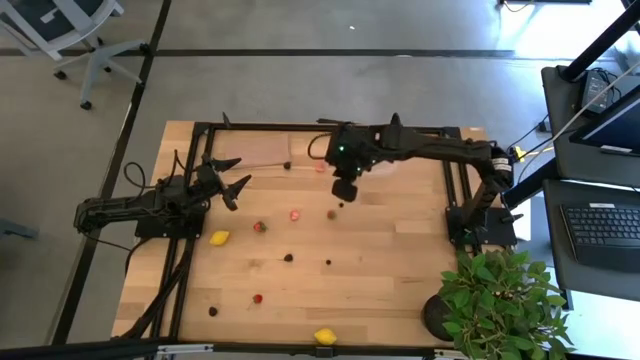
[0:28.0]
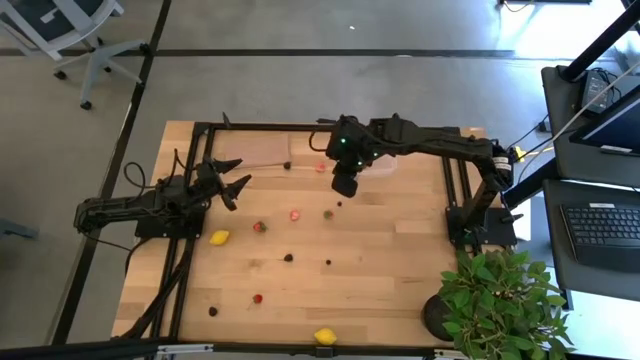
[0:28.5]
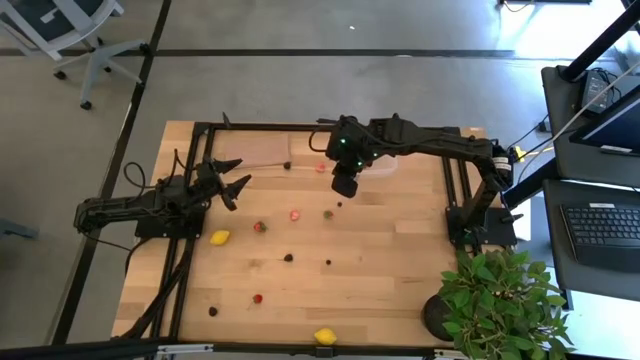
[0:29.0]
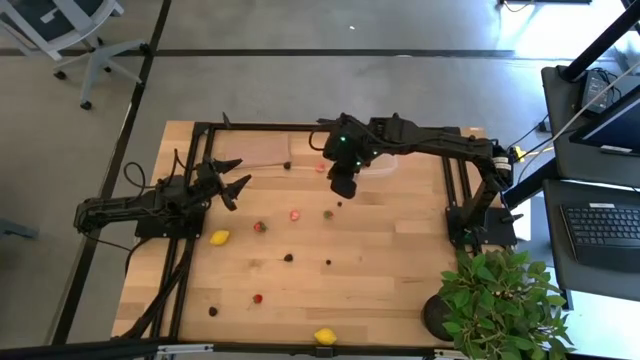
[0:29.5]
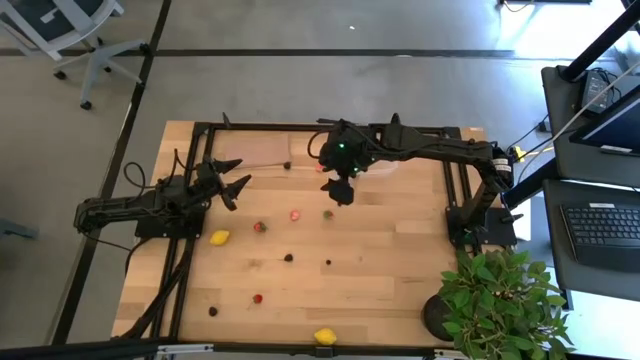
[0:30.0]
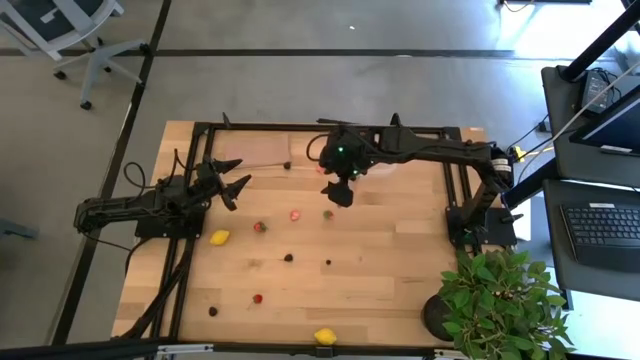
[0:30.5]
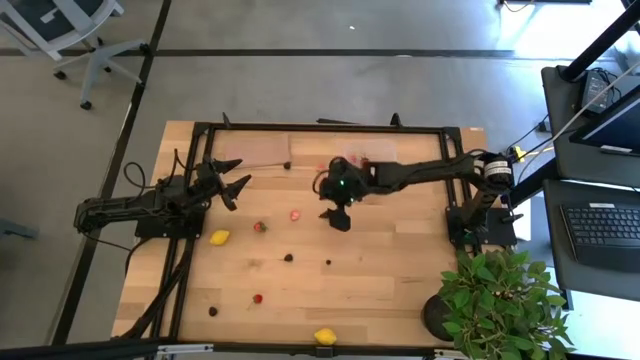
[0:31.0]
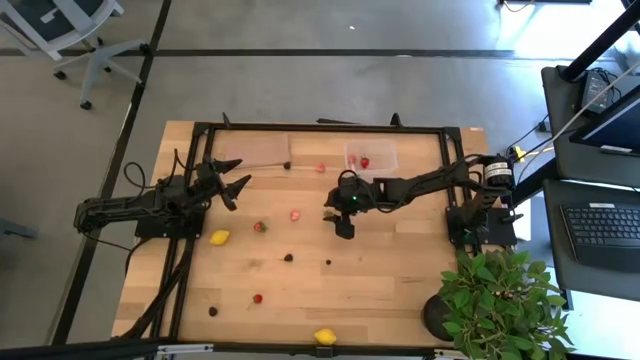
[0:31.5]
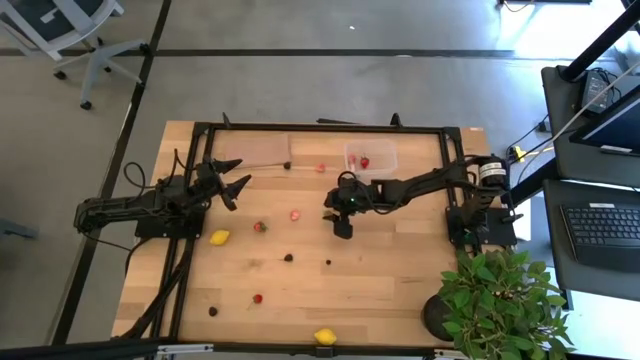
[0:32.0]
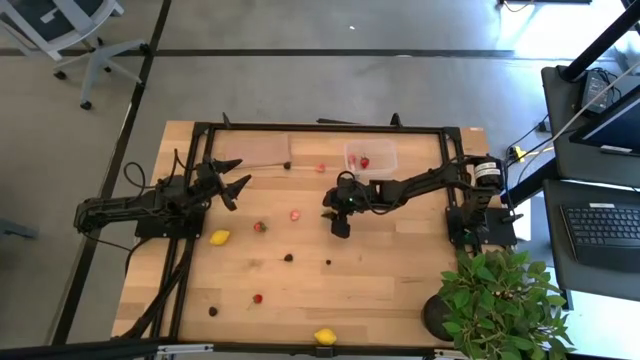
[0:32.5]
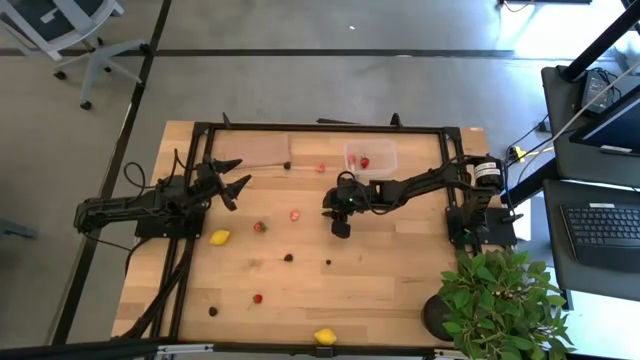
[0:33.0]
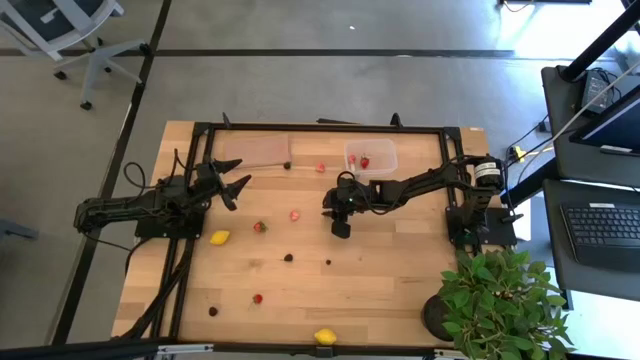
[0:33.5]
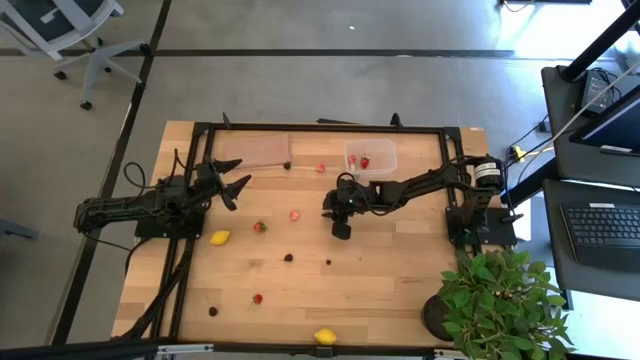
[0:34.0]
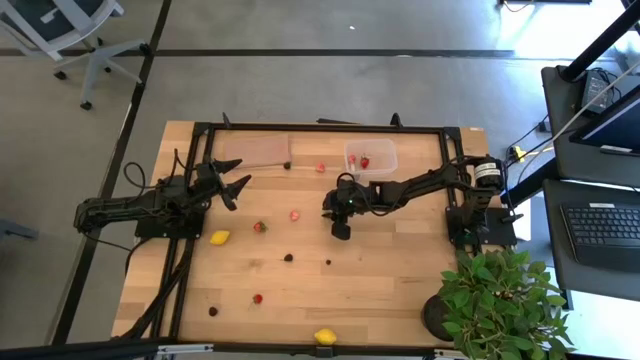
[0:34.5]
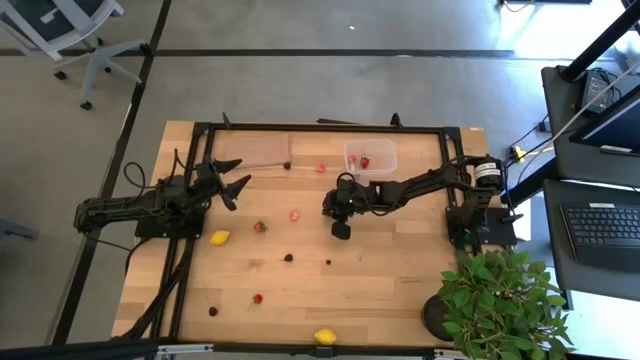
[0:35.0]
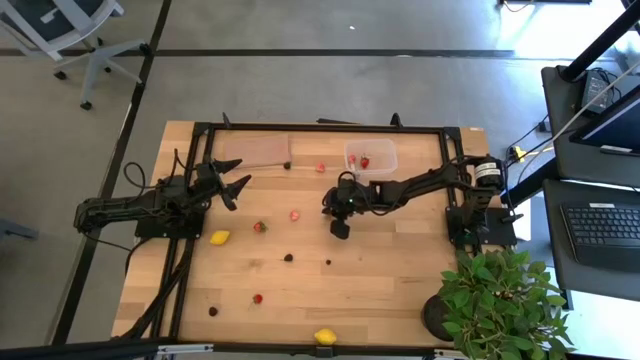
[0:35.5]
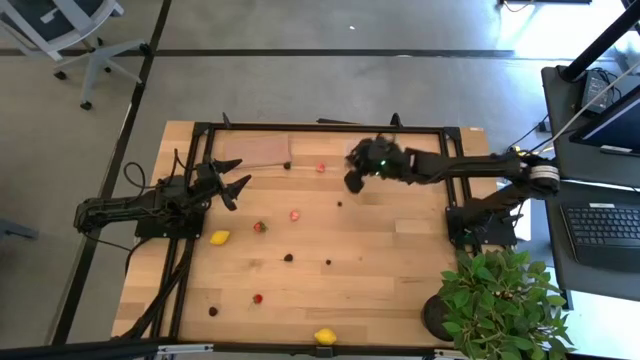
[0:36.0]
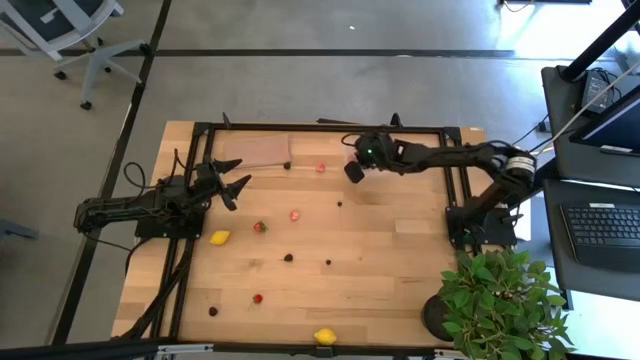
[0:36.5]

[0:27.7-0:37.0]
Task: Pick and placing Produce into tupperware
Put the strawberry into the transparent bin

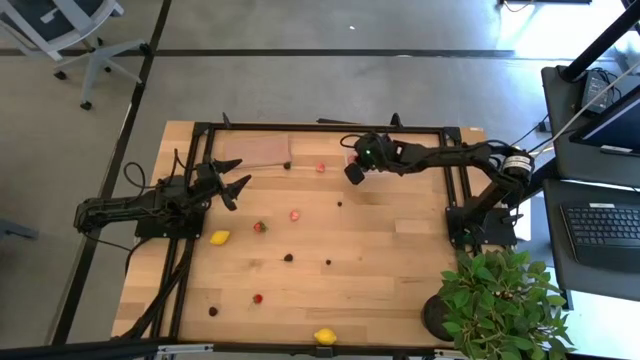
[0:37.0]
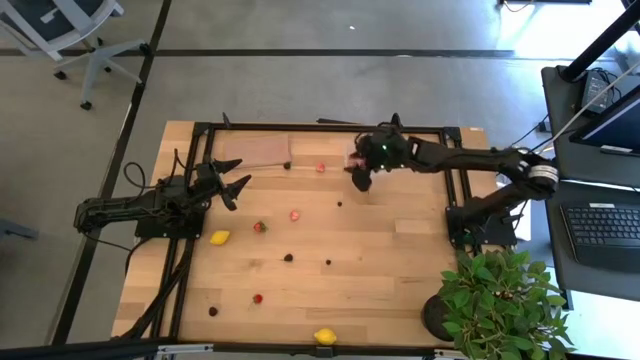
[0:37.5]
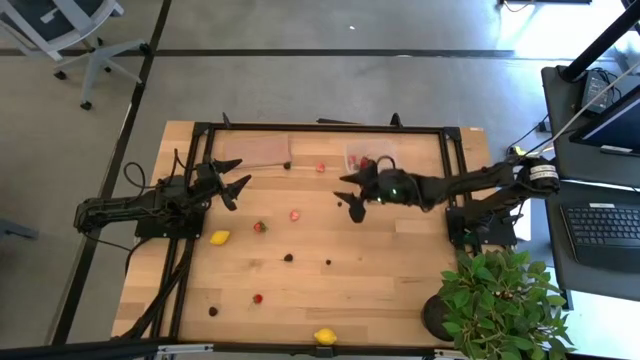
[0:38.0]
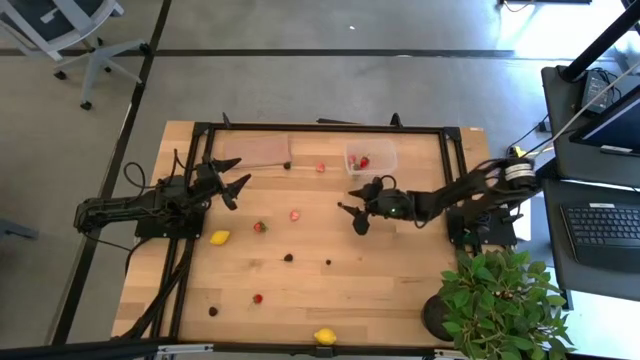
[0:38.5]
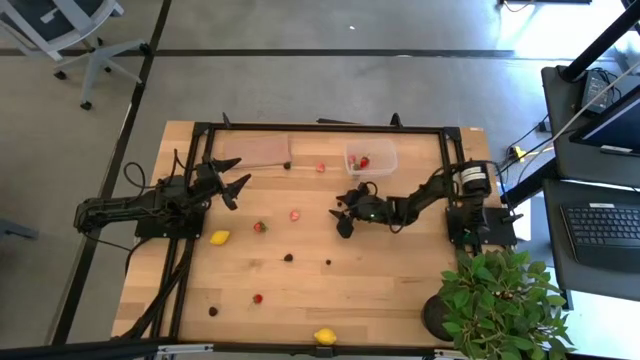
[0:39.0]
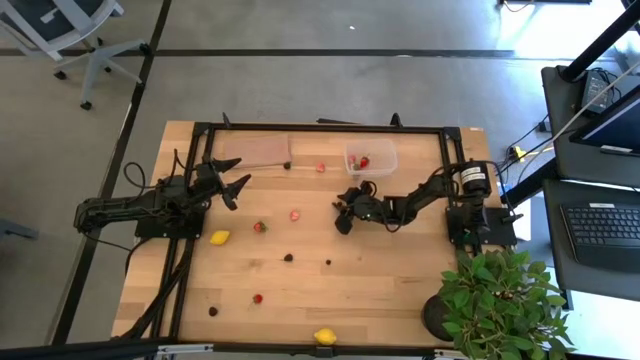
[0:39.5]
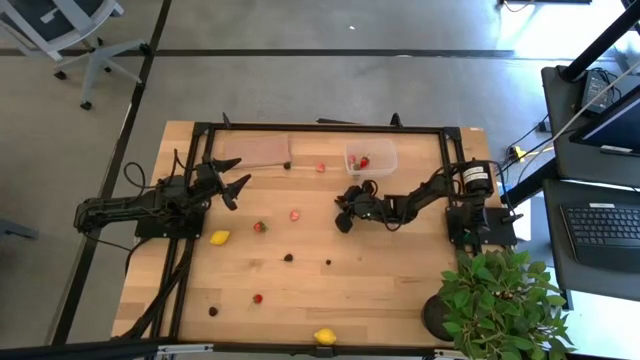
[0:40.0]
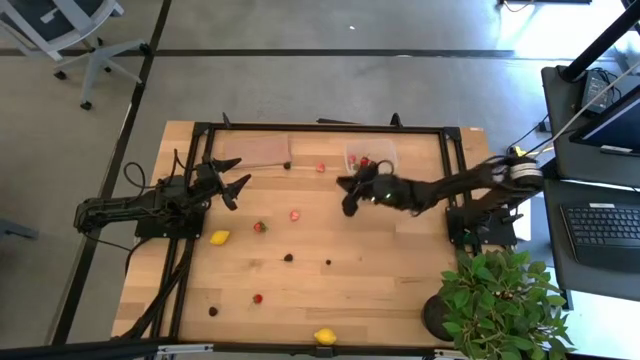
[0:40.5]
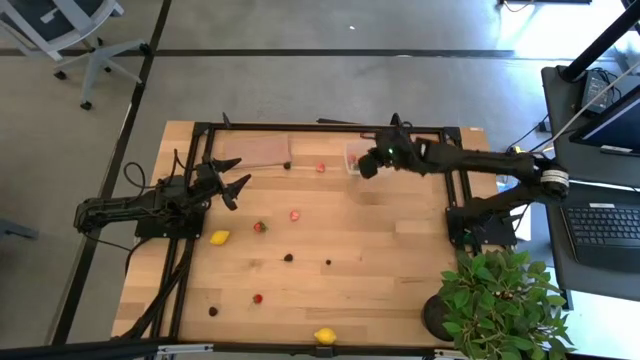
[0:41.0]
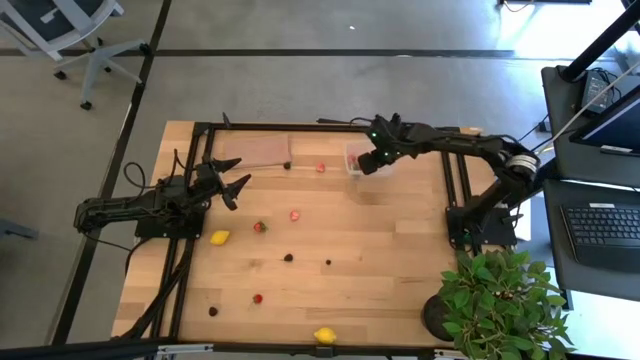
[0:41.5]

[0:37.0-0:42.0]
Put the blueberry into the transparent bin

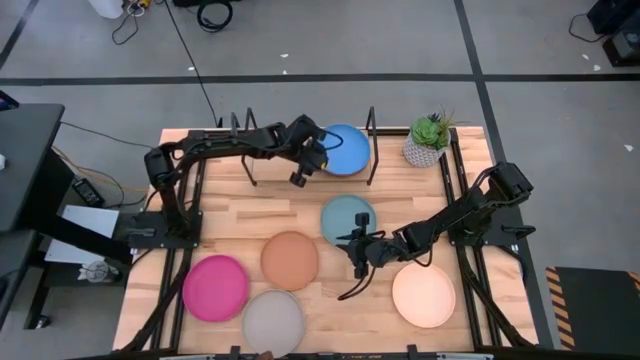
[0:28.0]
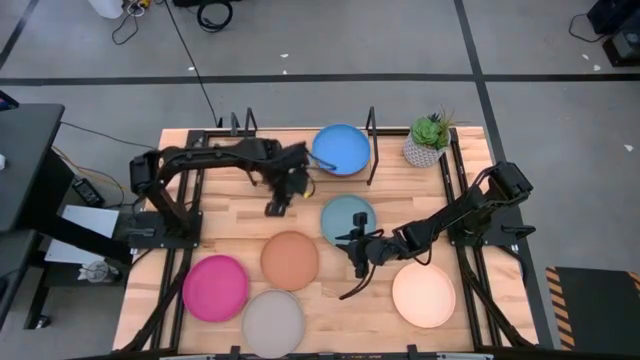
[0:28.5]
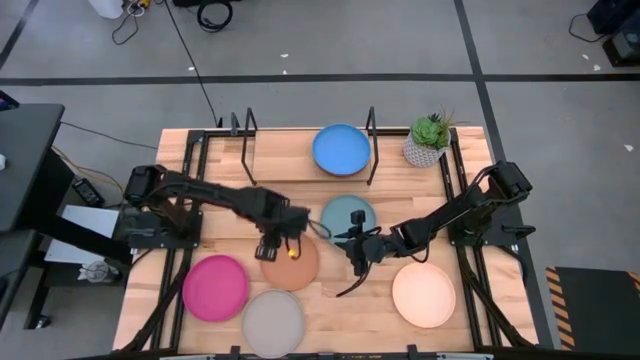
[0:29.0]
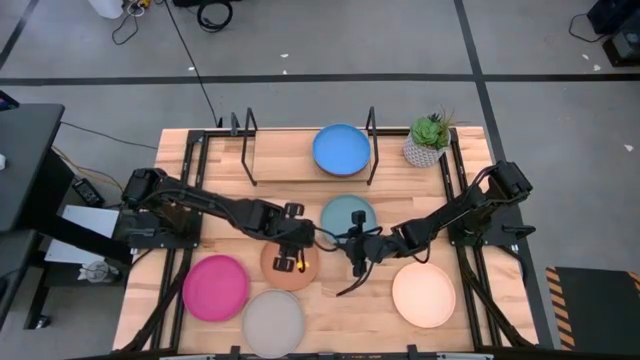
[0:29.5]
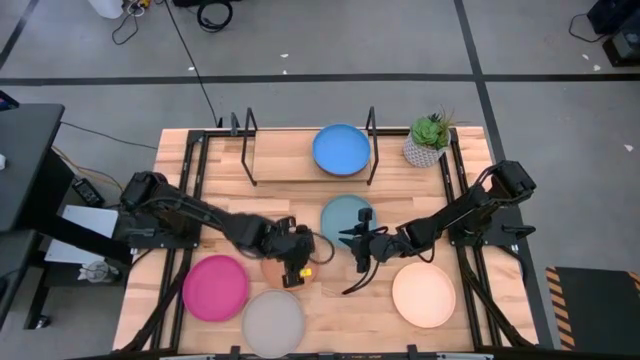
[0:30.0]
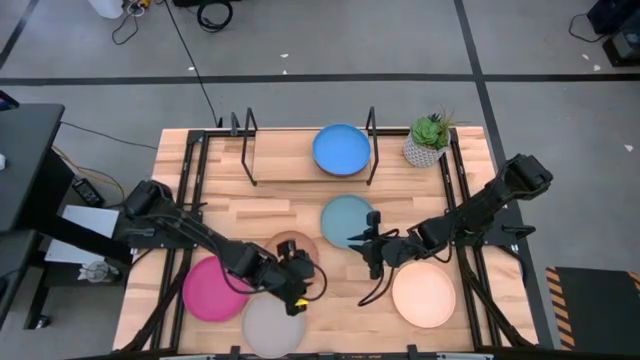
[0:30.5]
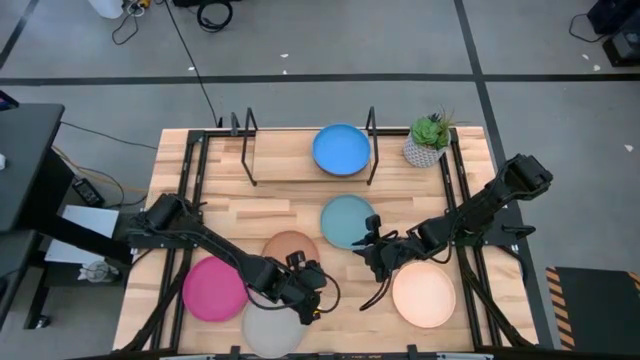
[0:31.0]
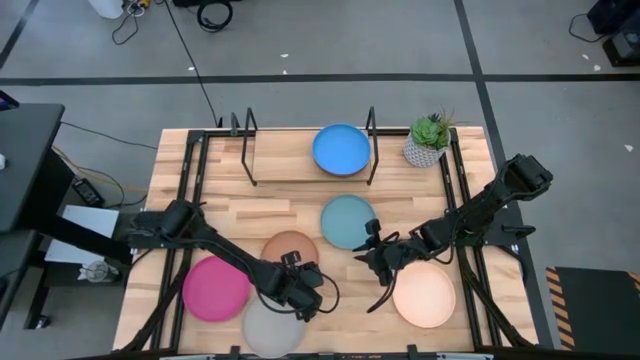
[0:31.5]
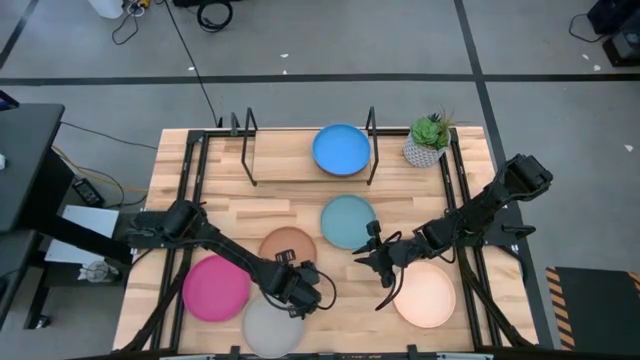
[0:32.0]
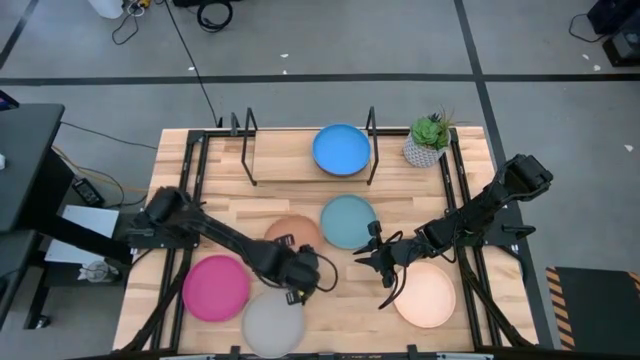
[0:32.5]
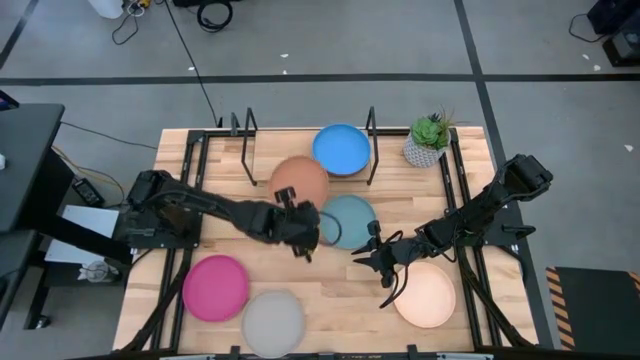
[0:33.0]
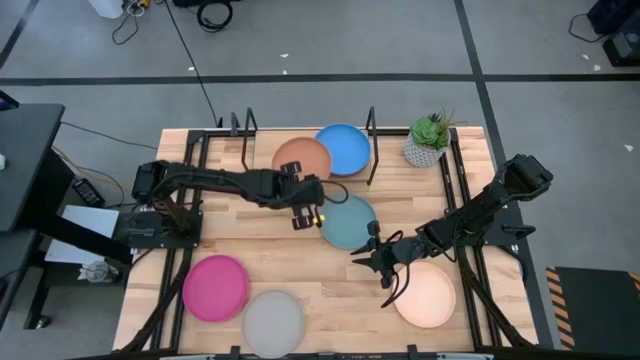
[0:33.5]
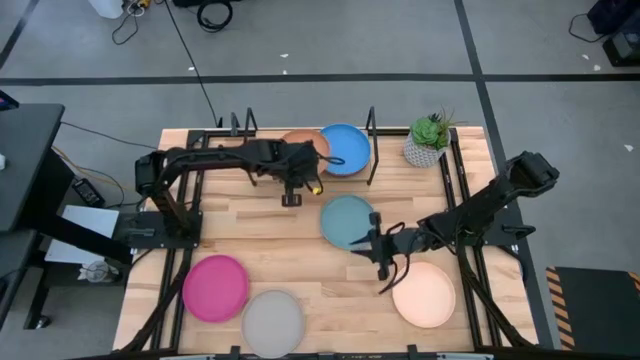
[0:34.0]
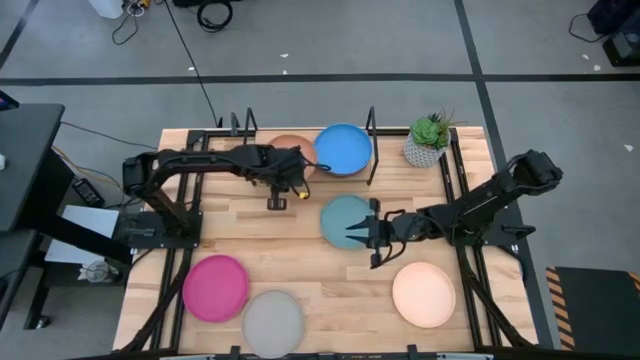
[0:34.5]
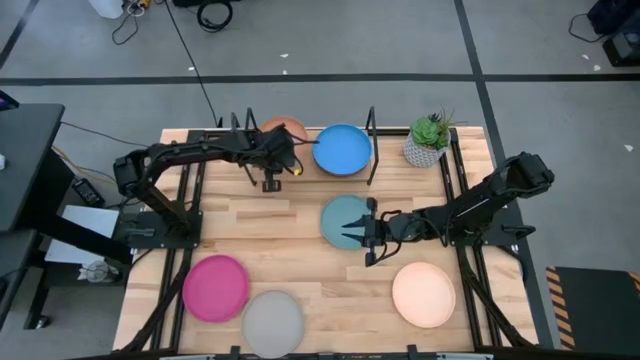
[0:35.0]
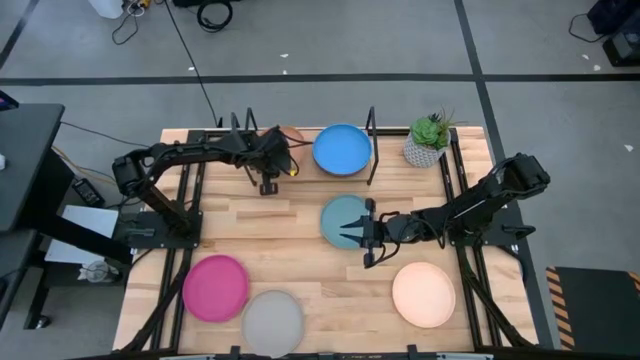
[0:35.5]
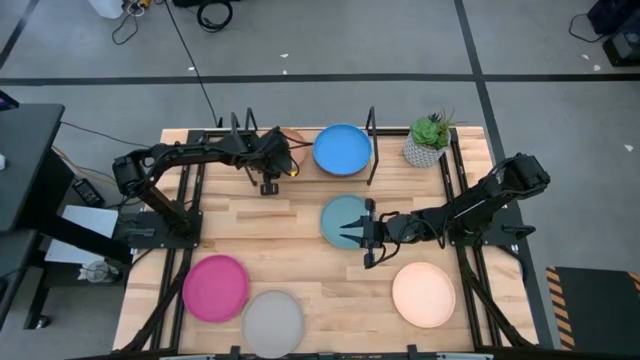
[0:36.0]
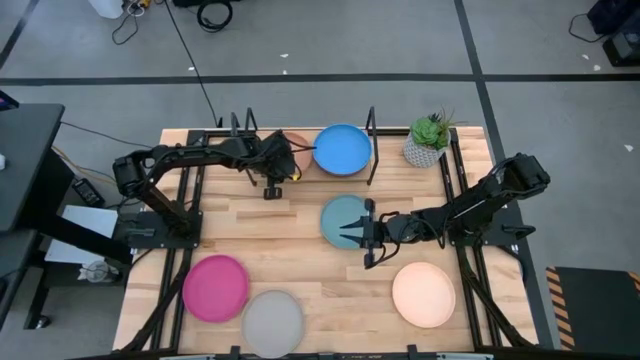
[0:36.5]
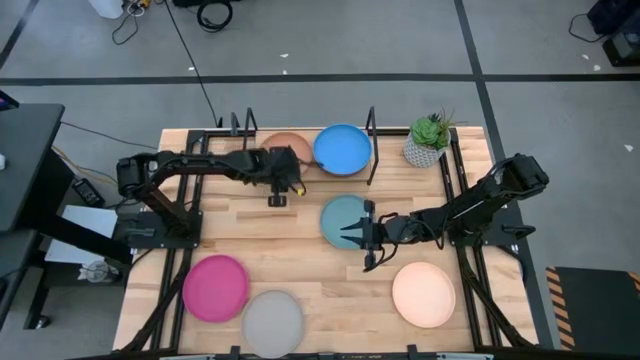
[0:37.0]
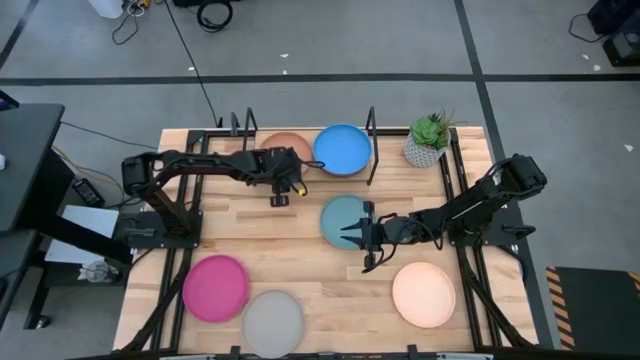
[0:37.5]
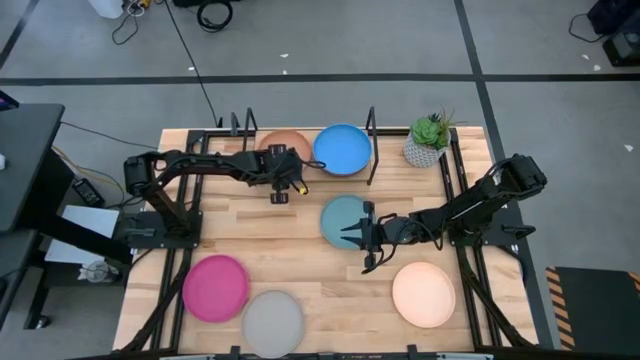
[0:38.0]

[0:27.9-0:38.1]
Task: Place and stack plates onto a shelf
Put the brown plate on the shelf
